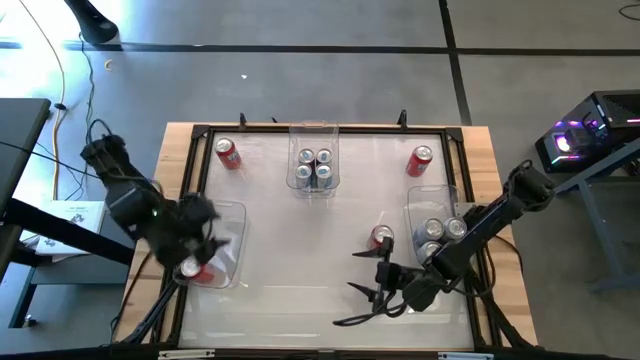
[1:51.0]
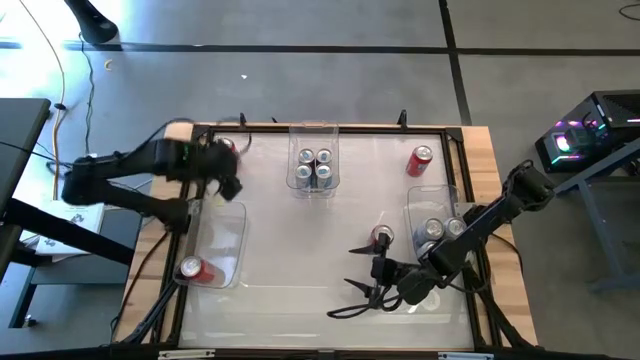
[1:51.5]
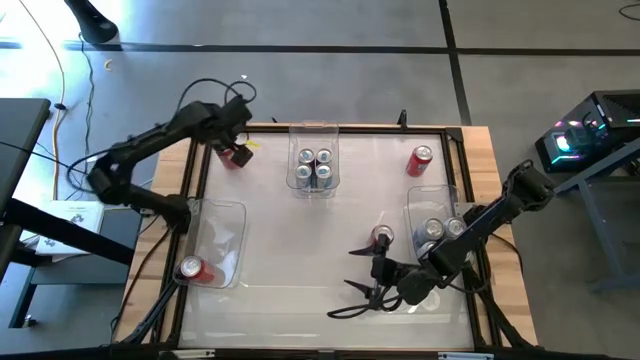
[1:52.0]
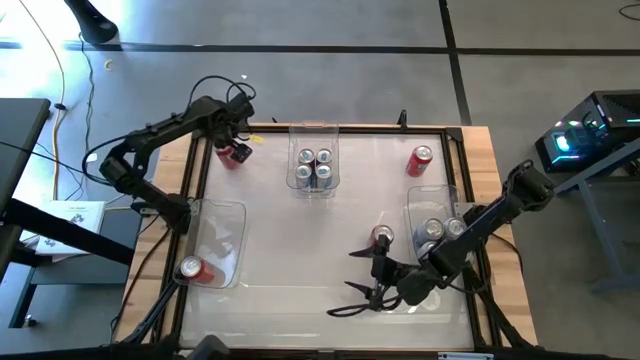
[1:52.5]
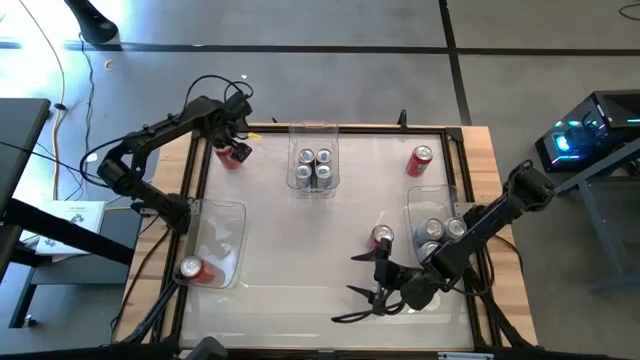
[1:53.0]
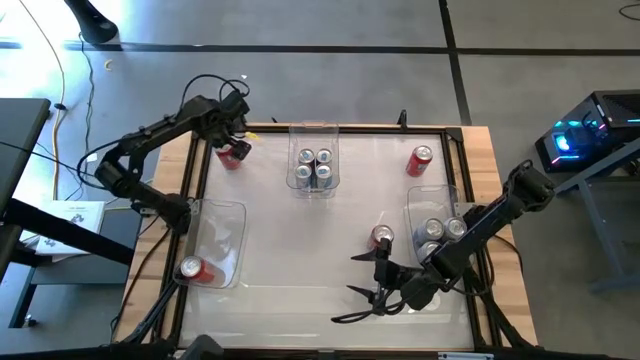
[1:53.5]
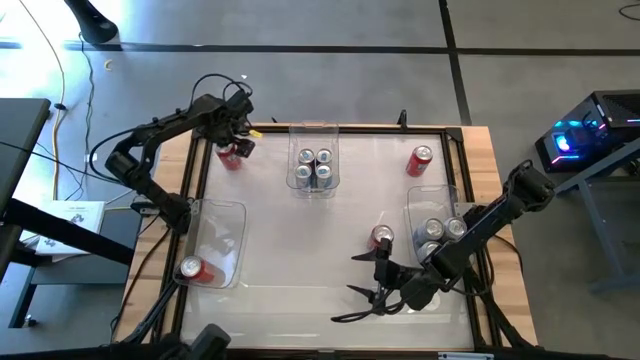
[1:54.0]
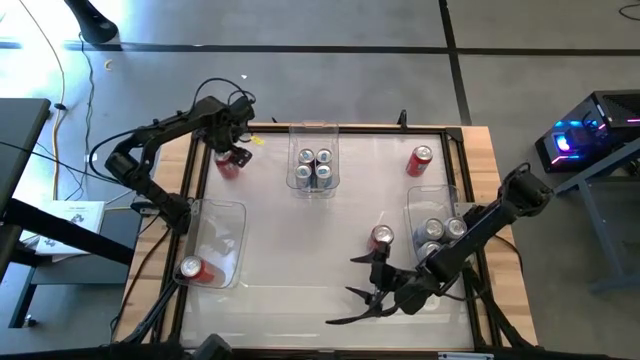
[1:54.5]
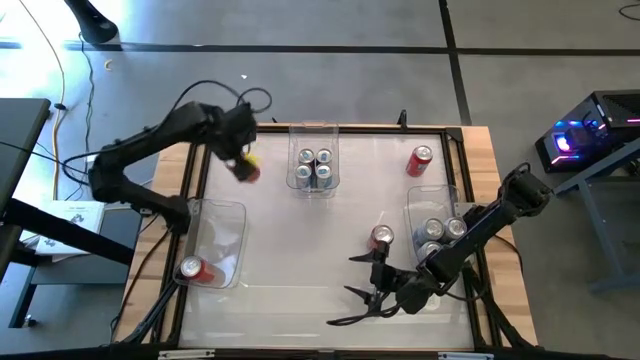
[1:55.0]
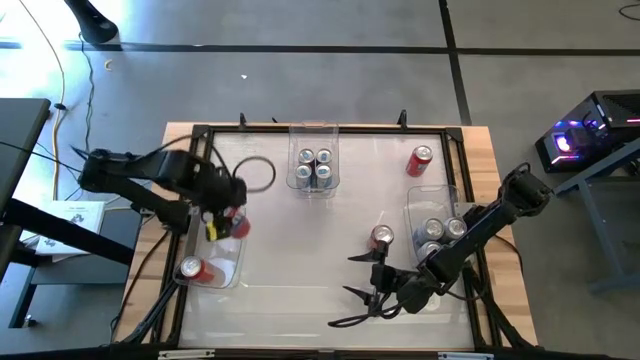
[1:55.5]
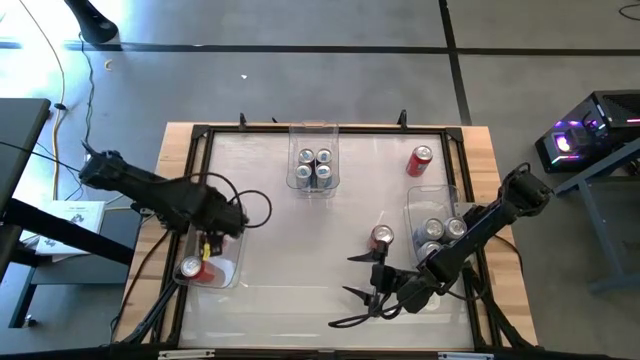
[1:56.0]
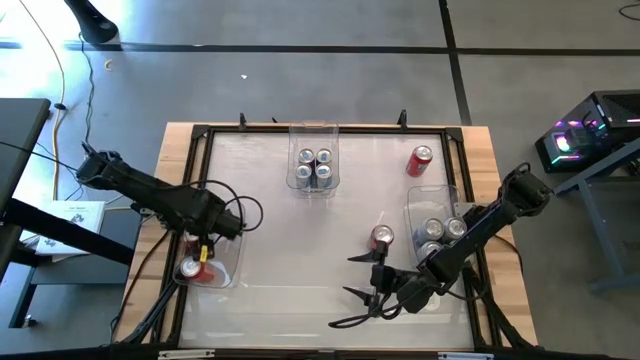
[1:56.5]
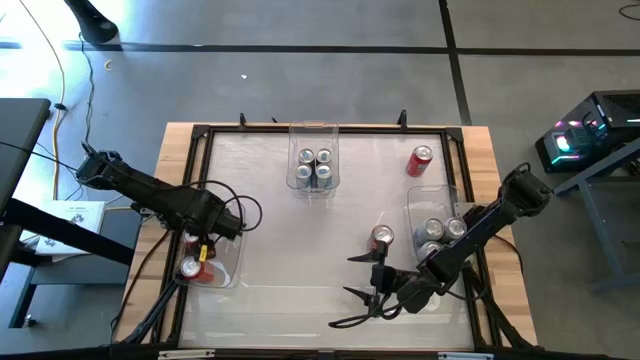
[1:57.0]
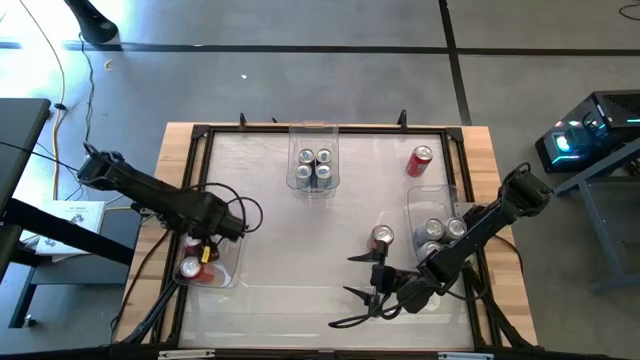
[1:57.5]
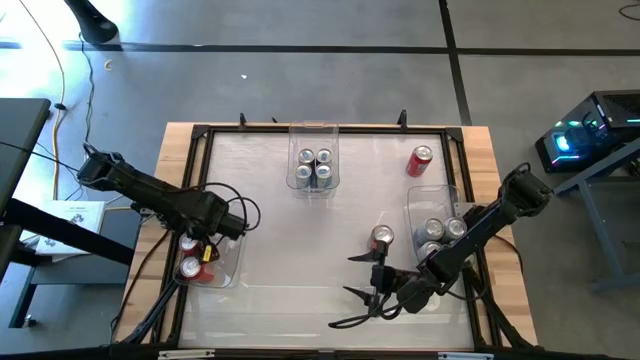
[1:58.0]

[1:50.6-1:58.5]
Task: Sort soda cans
Put the top left orange soda can into bottom left transparent bin

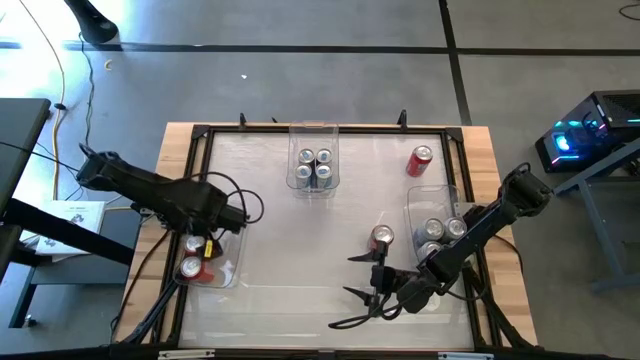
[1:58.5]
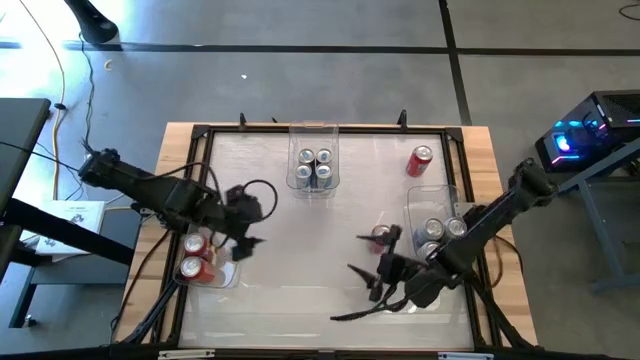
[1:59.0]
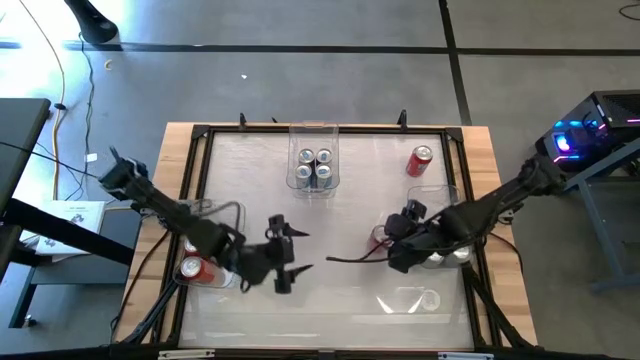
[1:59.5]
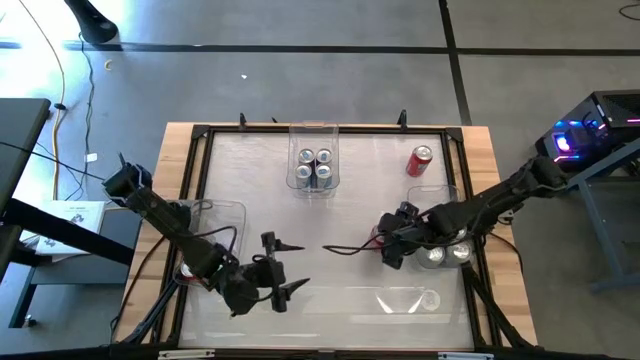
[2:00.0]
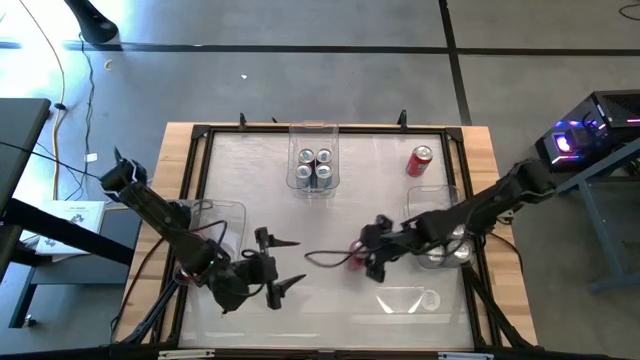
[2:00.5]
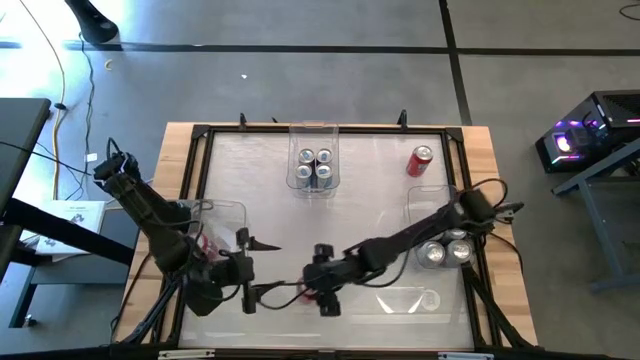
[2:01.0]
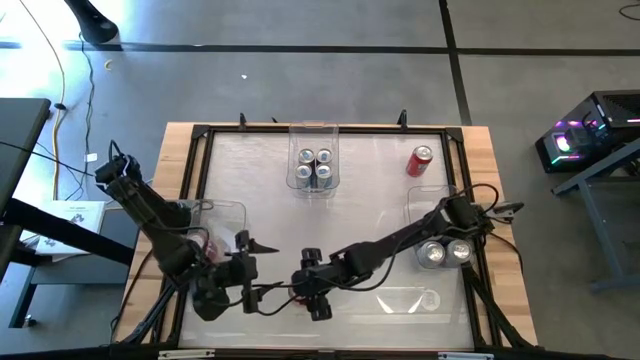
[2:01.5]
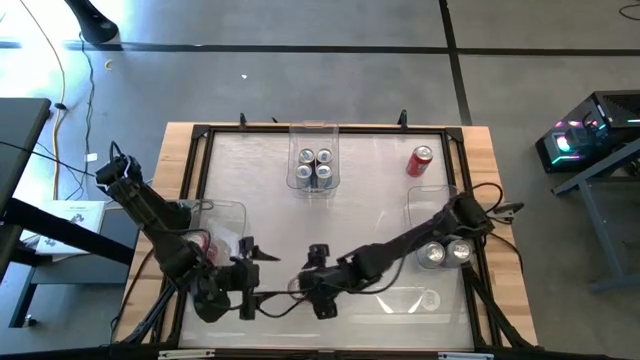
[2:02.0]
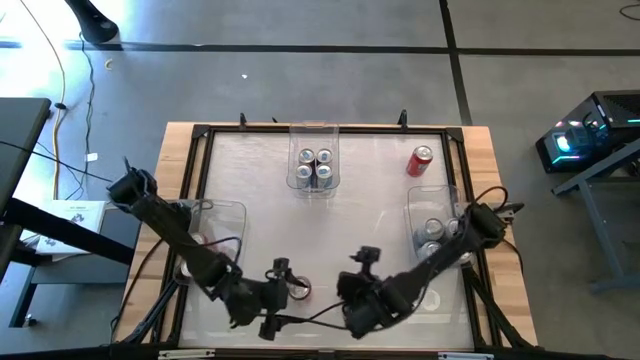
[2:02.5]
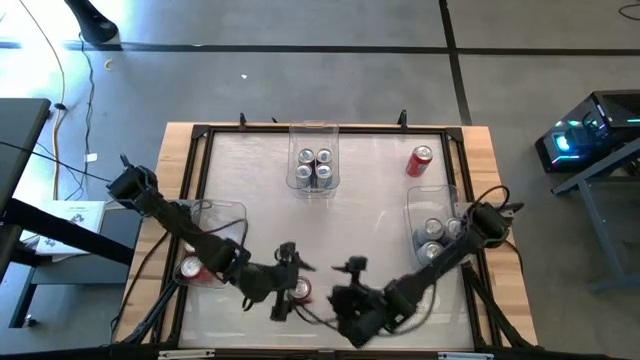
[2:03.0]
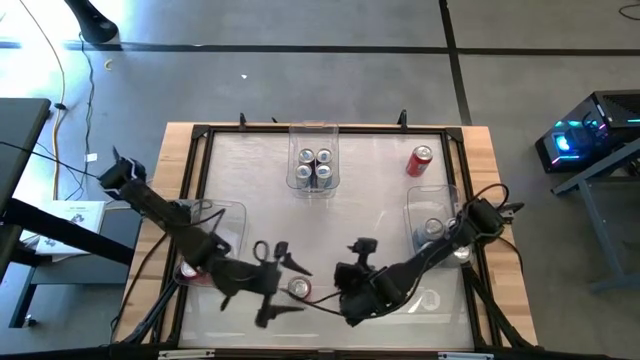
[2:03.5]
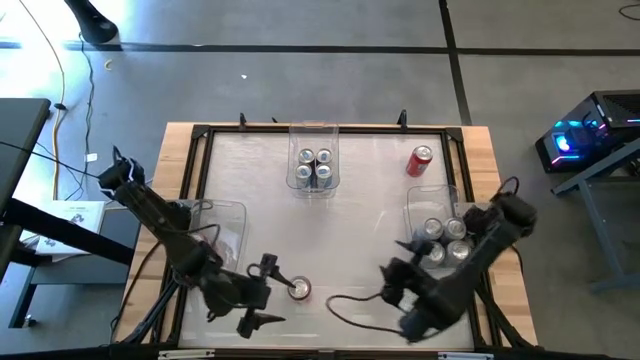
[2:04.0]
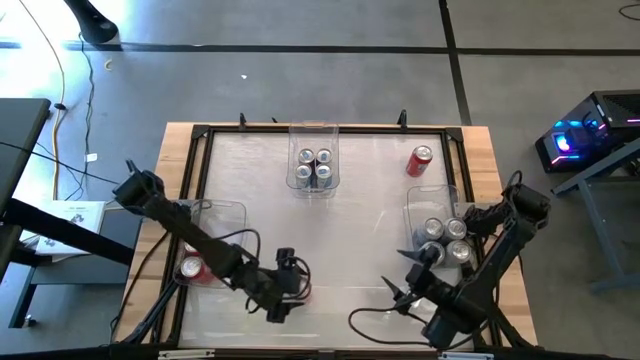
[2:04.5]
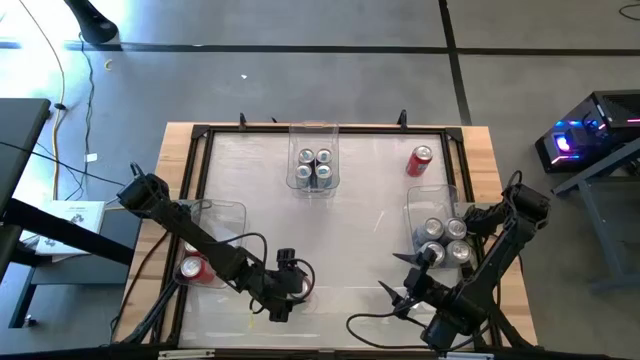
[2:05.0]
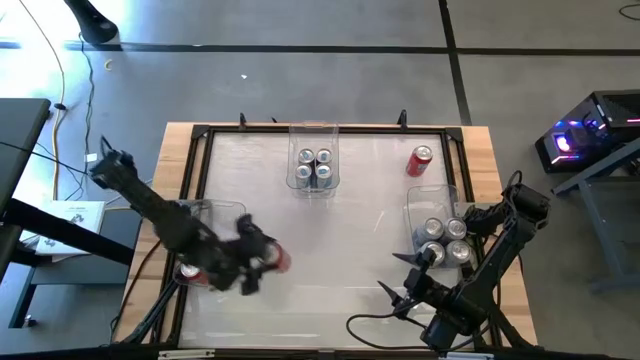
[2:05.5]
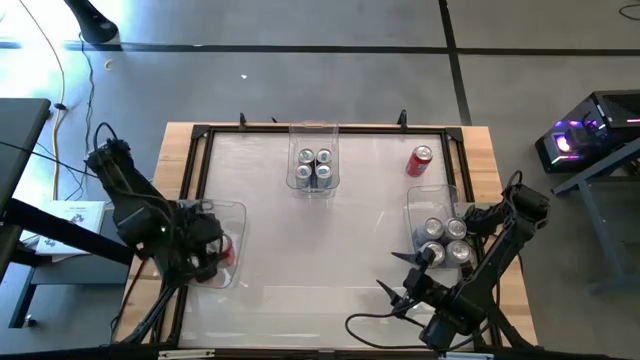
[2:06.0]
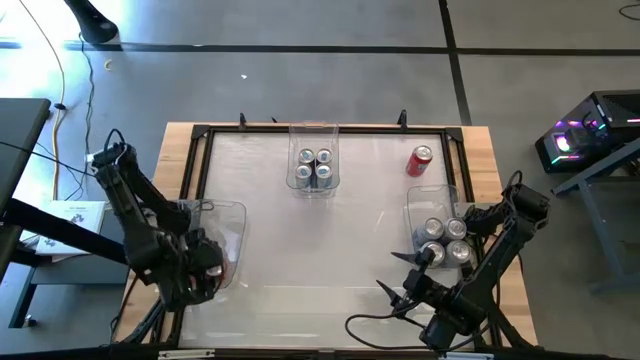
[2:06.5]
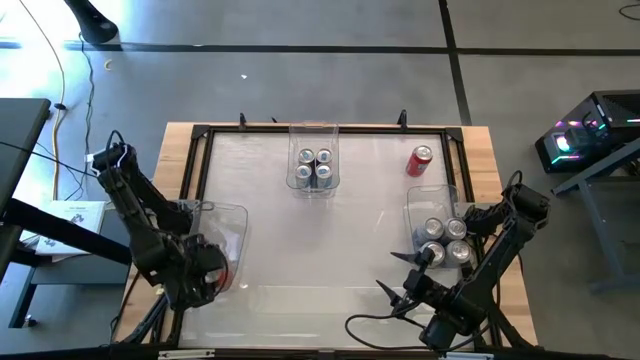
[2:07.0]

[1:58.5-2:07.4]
Put the bottom orange soda can into bottom left center transparent bin

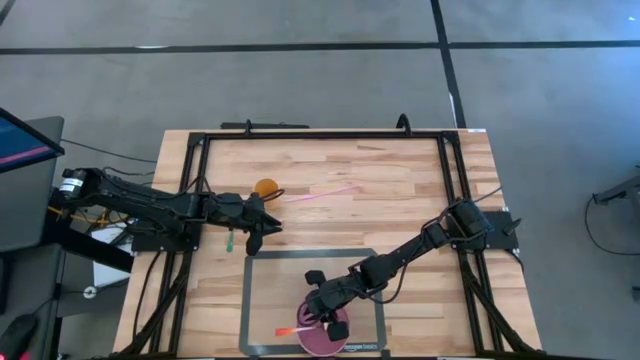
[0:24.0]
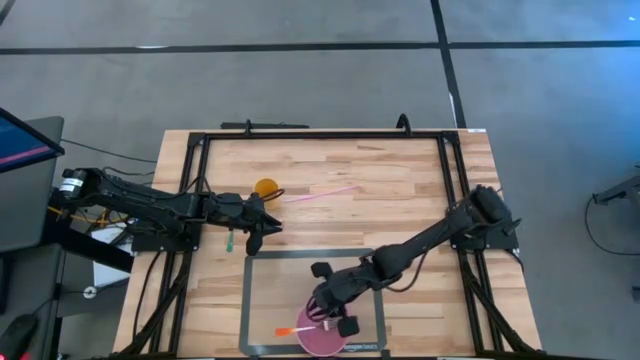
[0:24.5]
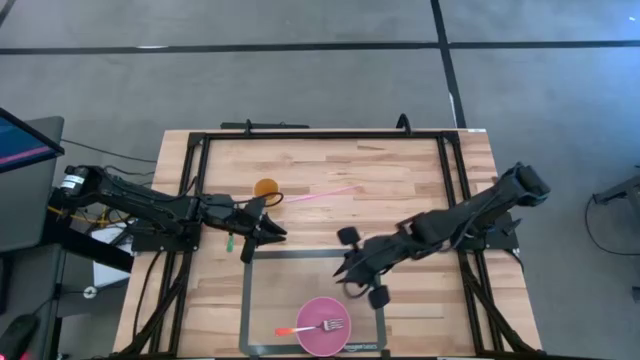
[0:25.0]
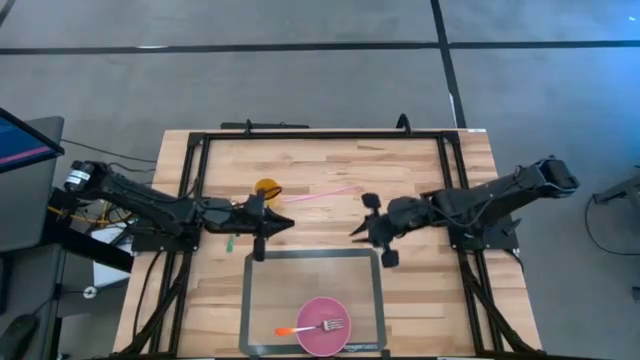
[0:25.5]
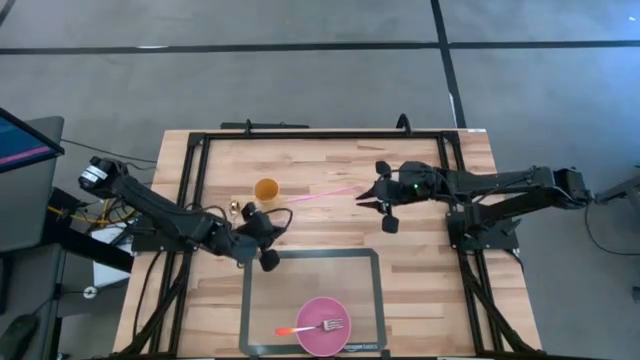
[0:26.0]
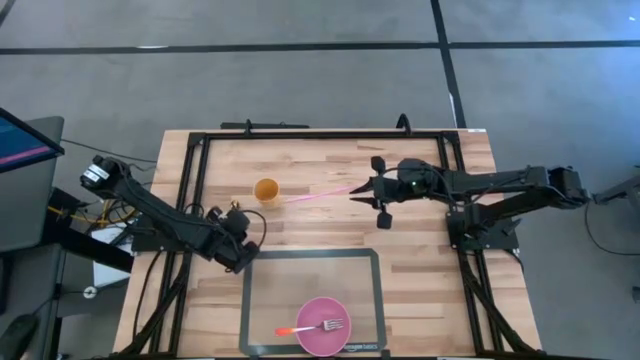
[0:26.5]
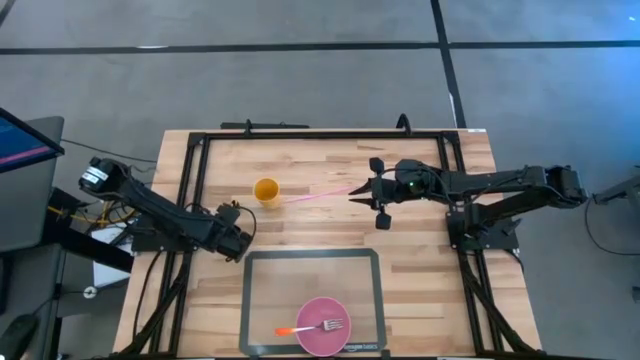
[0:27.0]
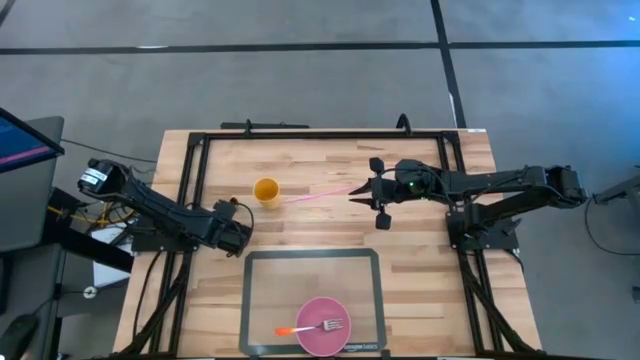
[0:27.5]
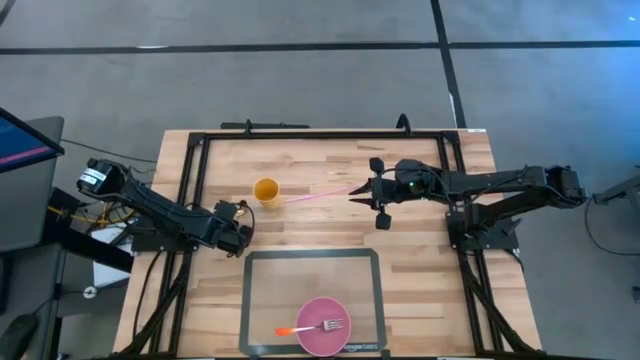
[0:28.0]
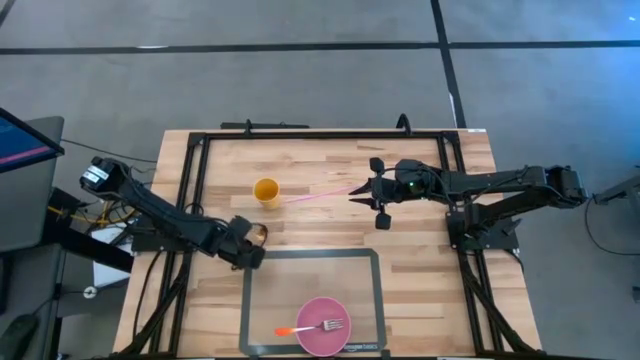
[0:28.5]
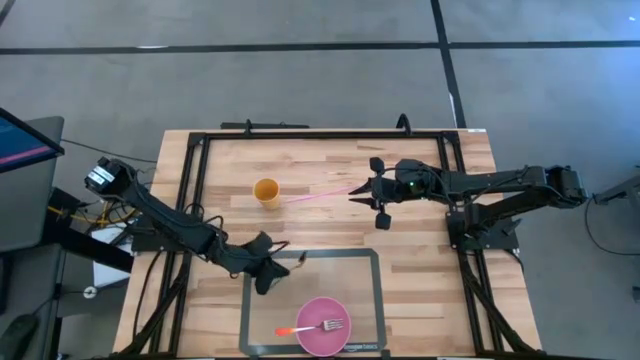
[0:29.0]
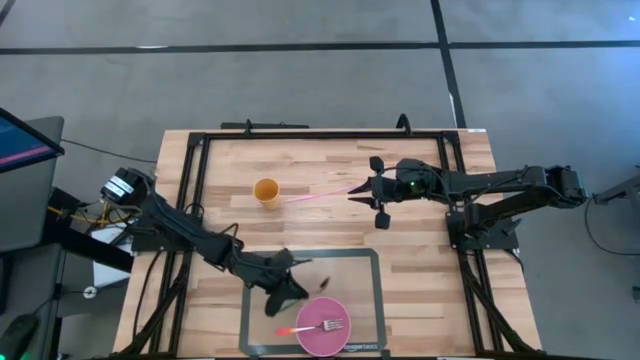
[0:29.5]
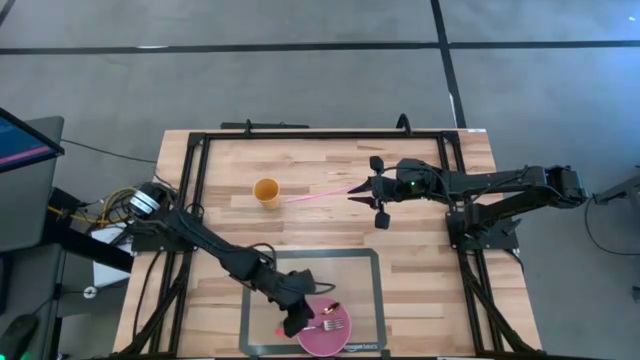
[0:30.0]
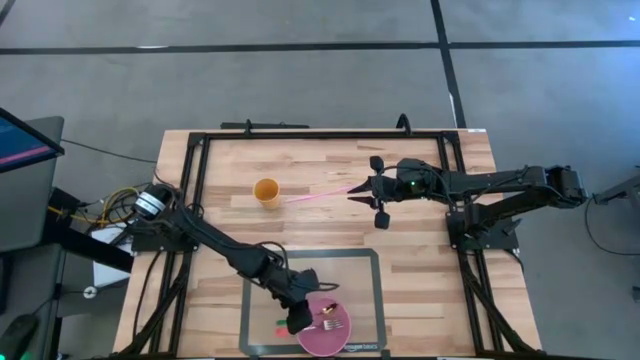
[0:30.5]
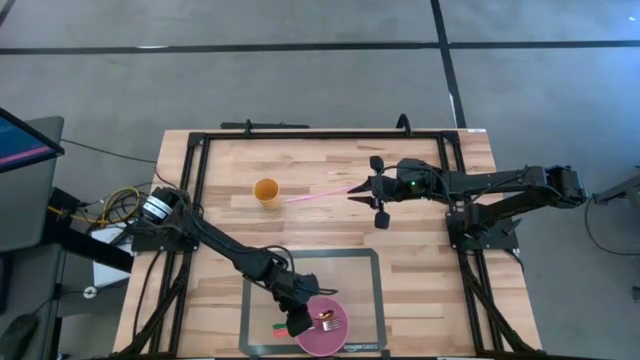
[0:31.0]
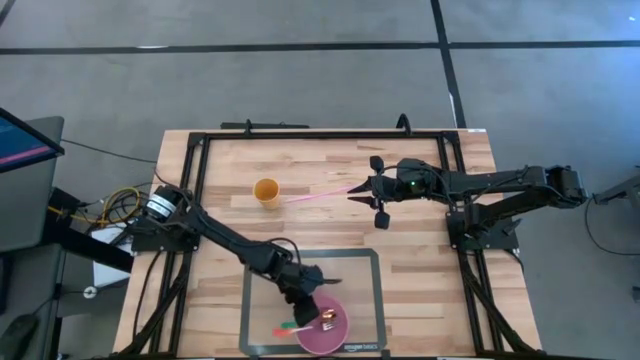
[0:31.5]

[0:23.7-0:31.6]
Task: Pick & Place Utensil
Put the green spoon into the pink bowl on the transparent mat
